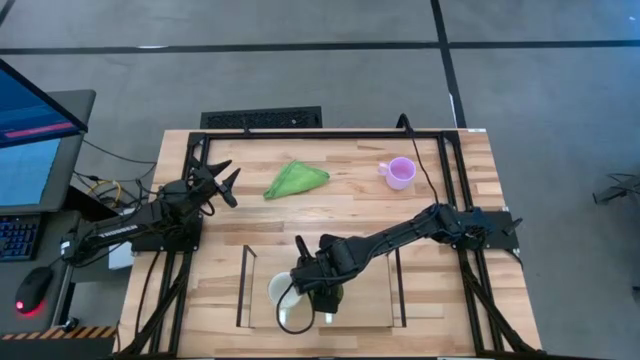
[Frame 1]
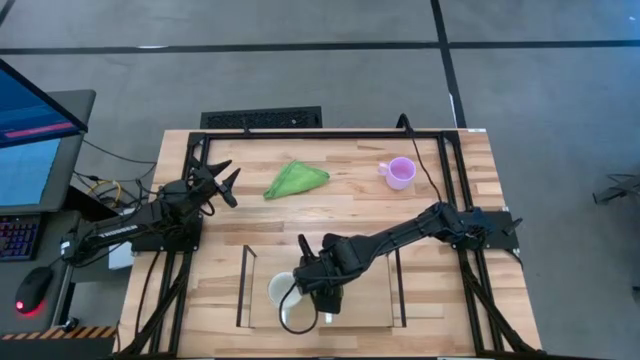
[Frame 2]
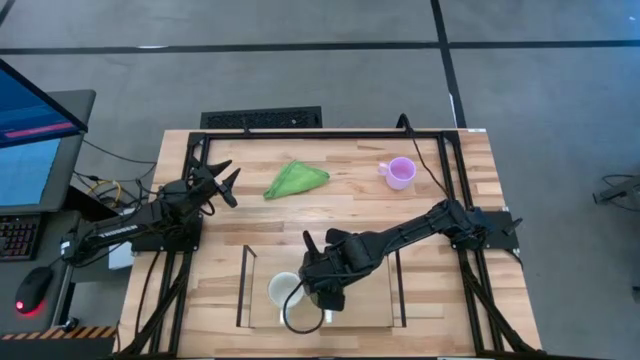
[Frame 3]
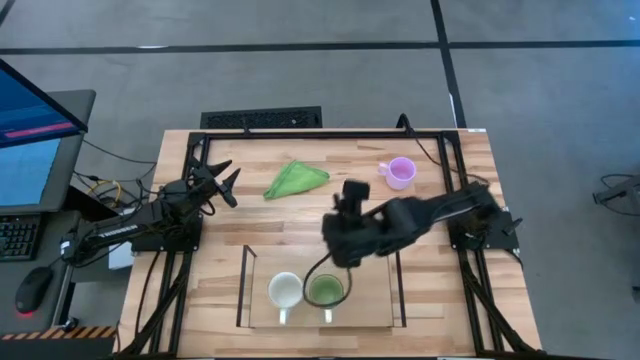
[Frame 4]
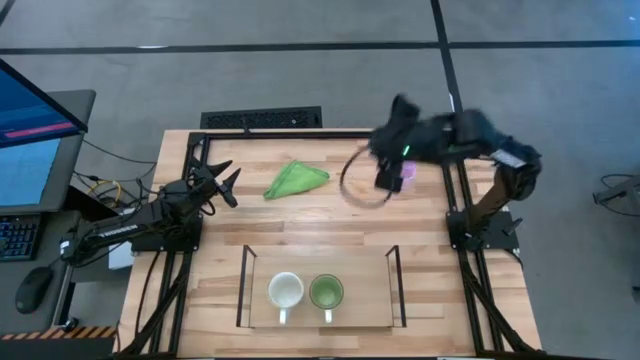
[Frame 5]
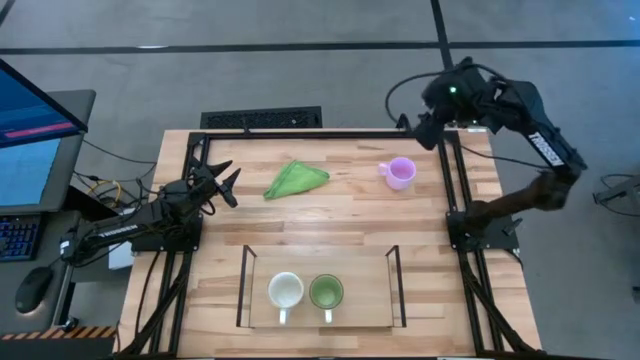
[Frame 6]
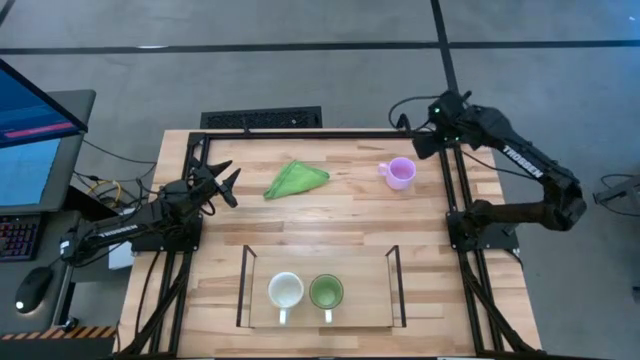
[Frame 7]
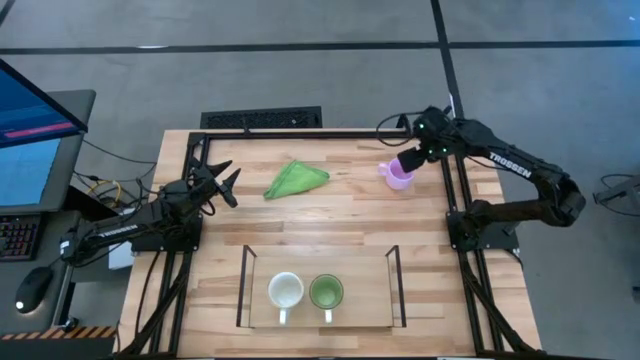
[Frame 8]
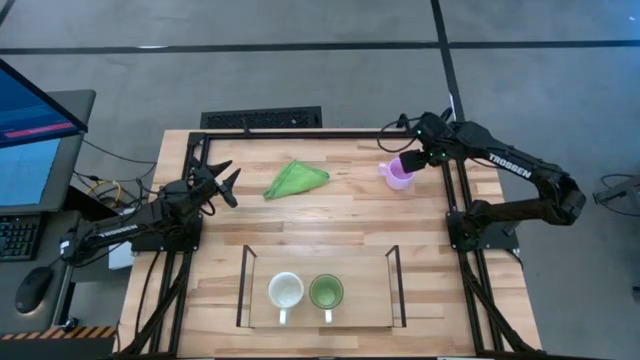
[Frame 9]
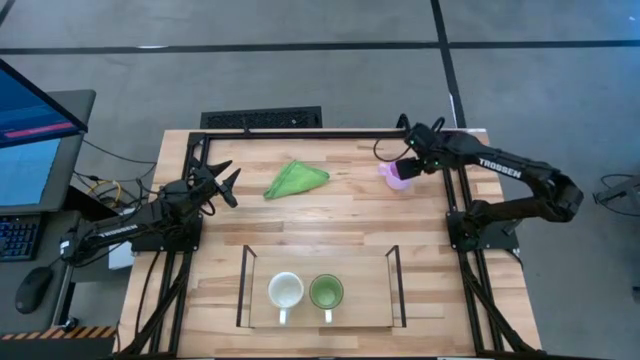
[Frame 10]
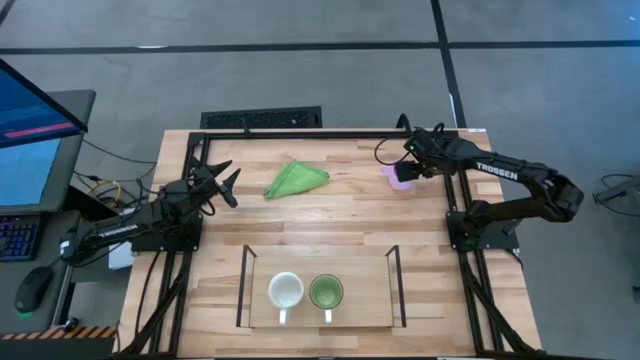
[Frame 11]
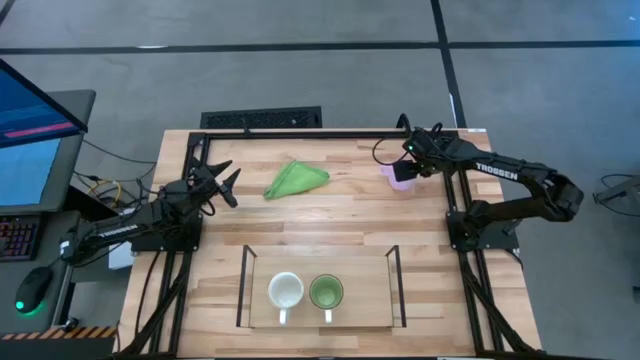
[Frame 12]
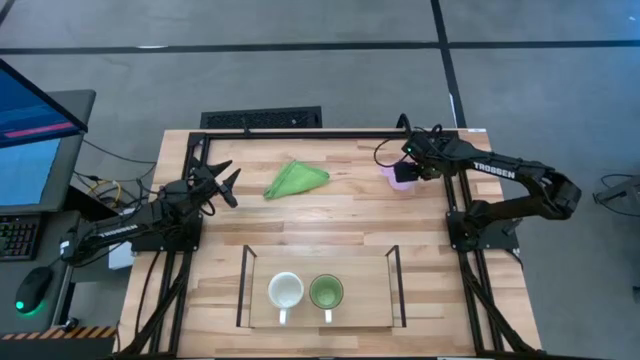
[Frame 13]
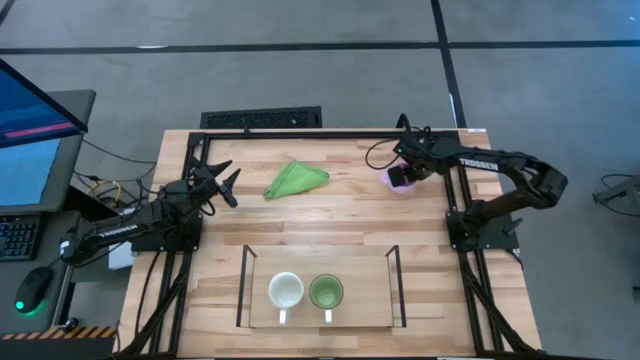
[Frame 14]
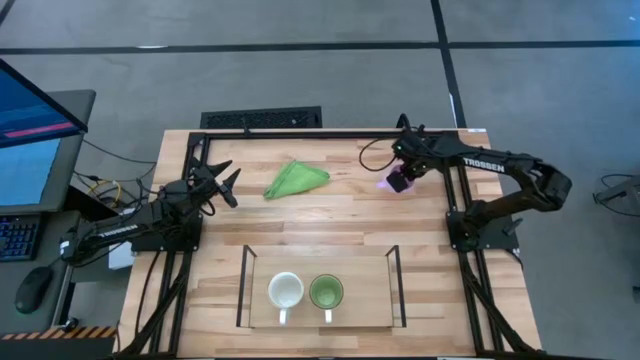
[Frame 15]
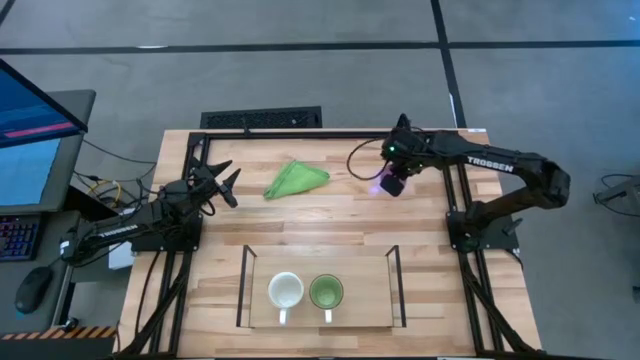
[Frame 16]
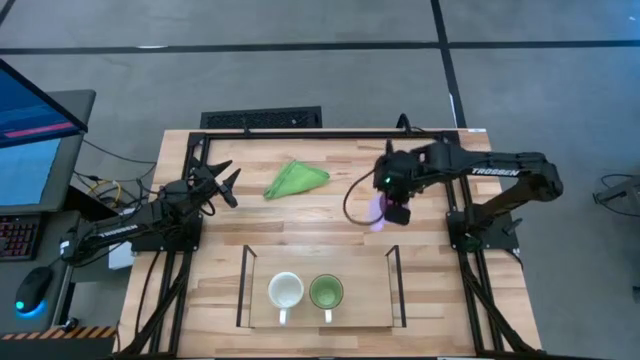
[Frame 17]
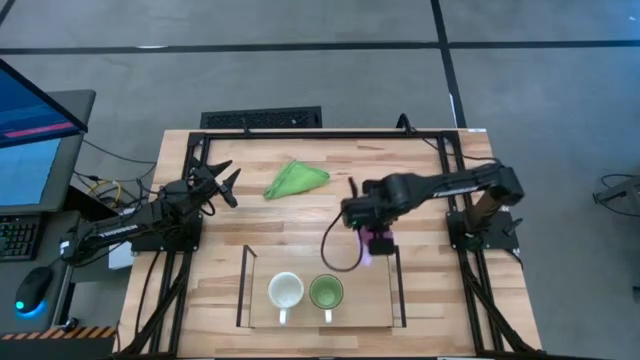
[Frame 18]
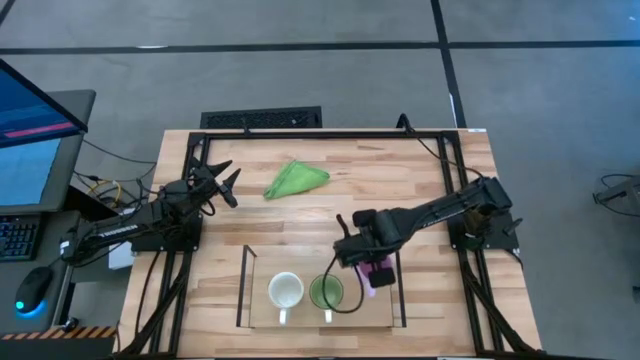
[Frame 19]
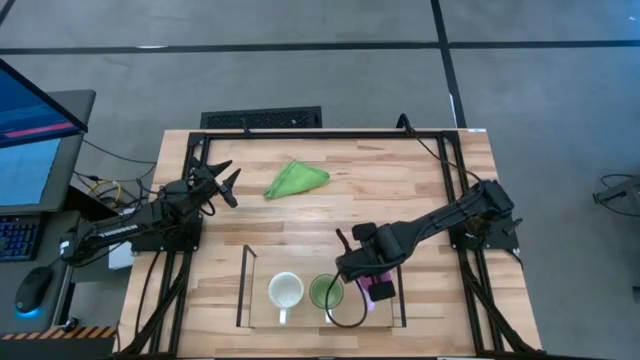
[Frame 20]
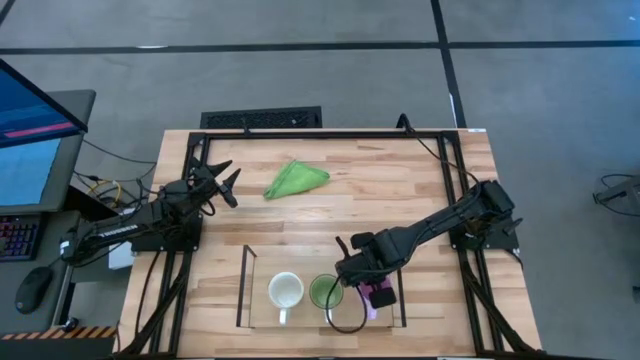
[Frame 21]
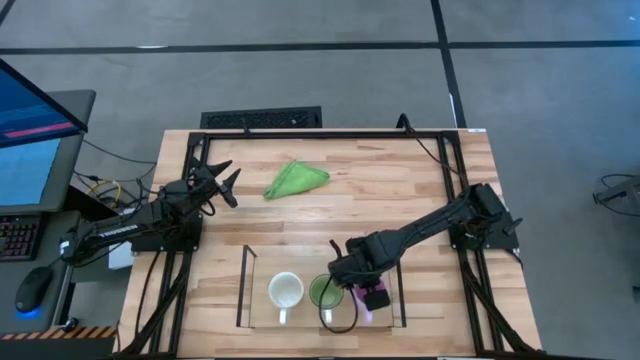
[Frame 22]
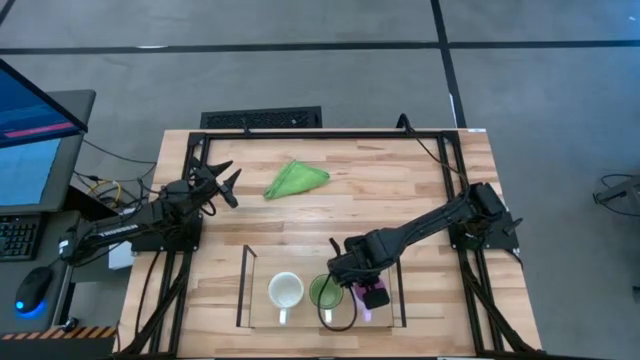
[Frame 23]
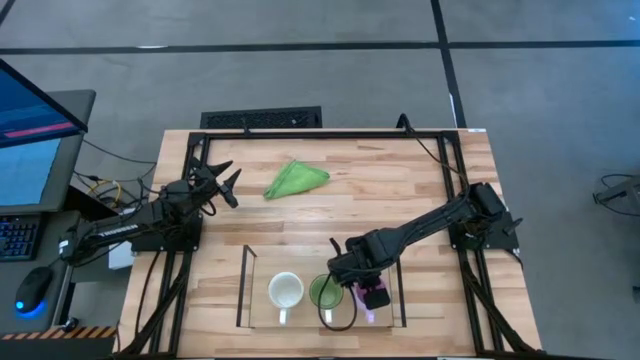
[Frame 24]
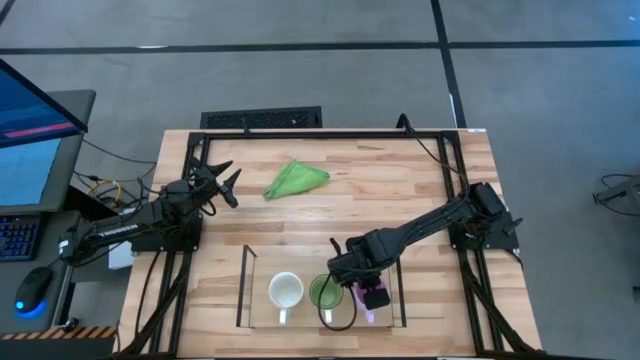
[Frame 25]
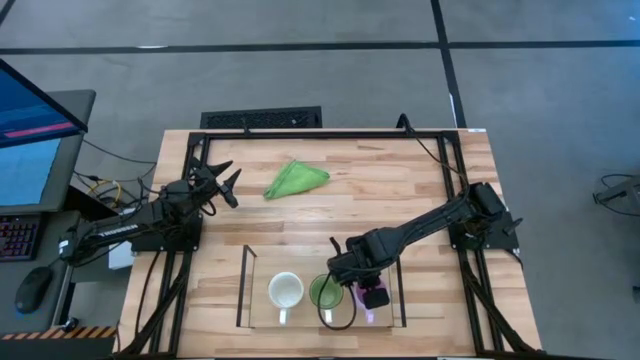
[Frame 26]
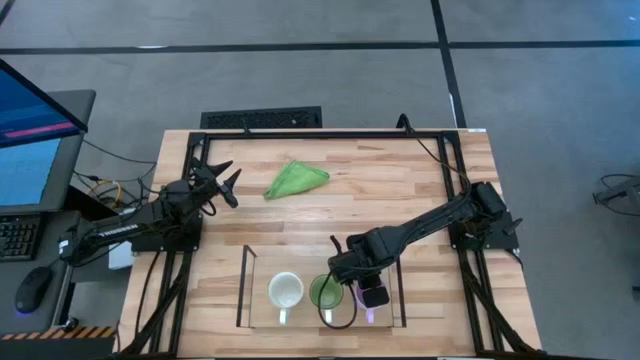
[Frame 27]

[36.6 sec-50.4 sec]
Task: Stack small to large cups/mugs on shelf
Put the pink mug on the shelf

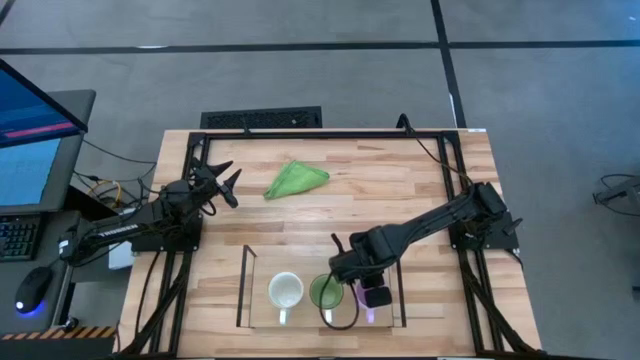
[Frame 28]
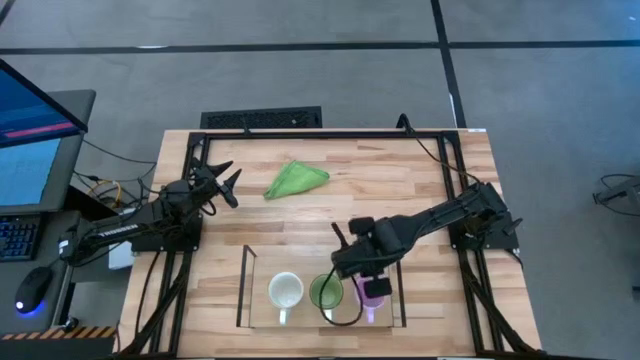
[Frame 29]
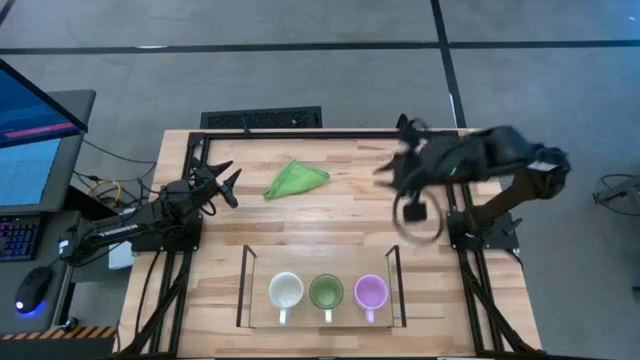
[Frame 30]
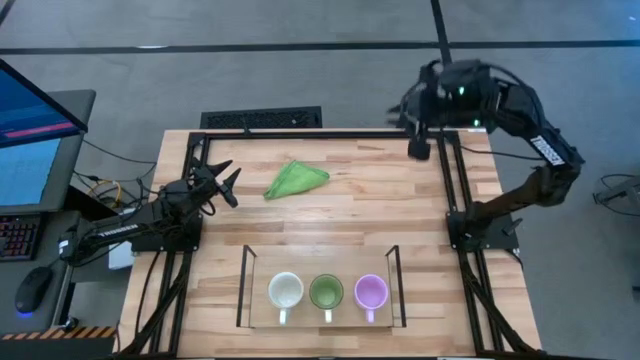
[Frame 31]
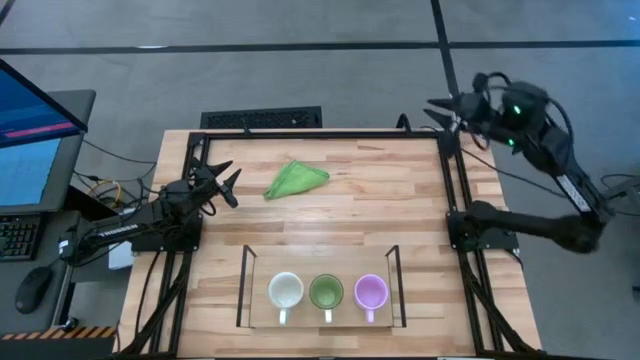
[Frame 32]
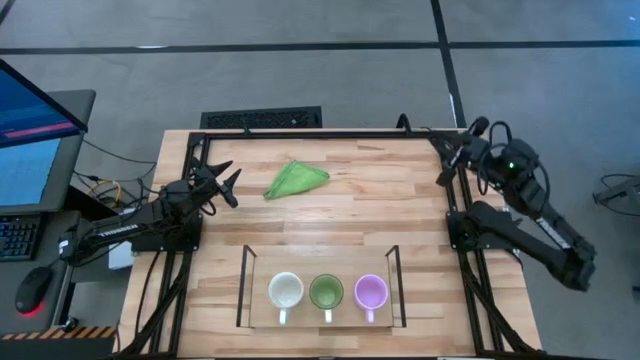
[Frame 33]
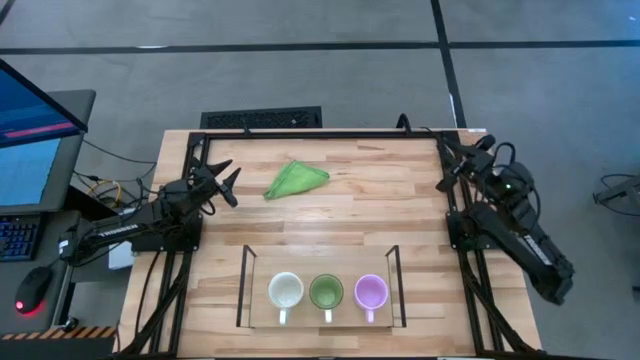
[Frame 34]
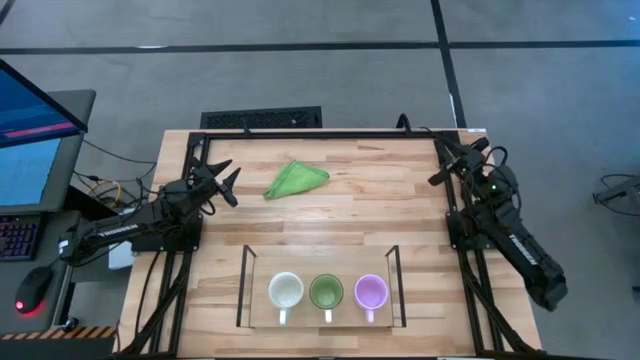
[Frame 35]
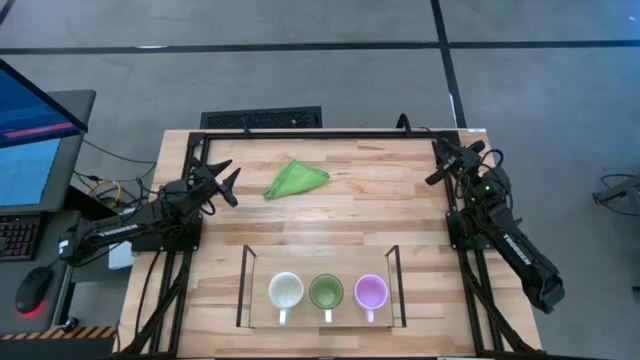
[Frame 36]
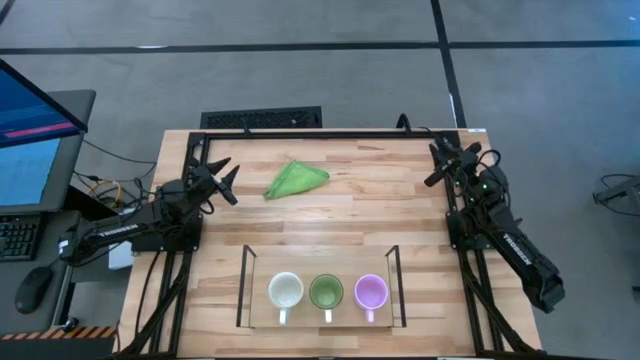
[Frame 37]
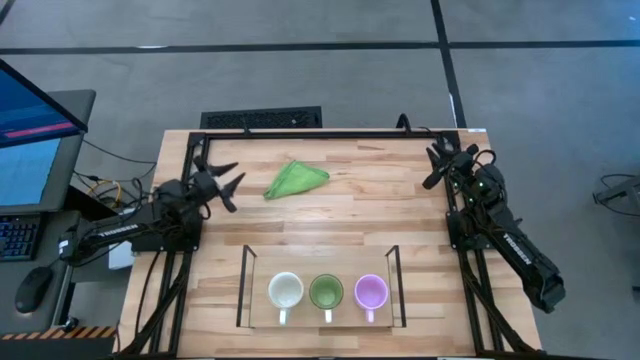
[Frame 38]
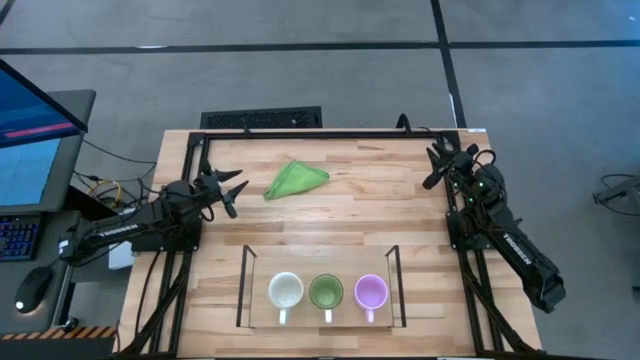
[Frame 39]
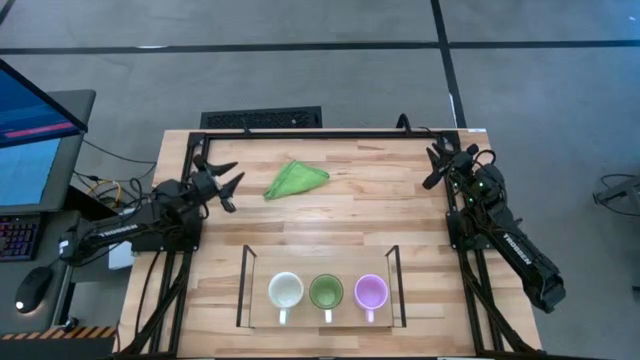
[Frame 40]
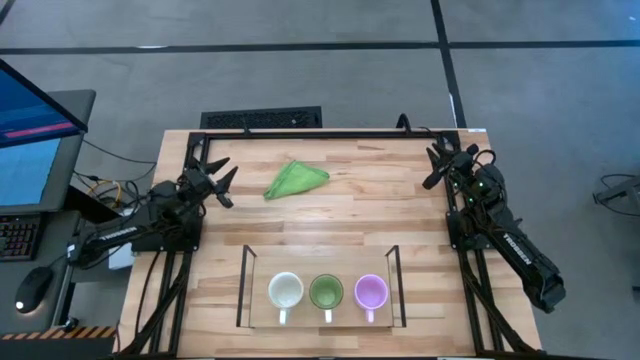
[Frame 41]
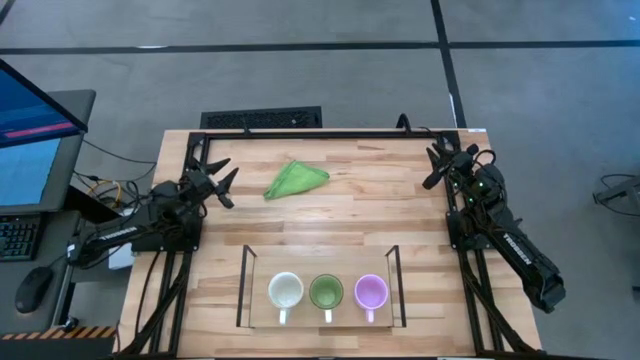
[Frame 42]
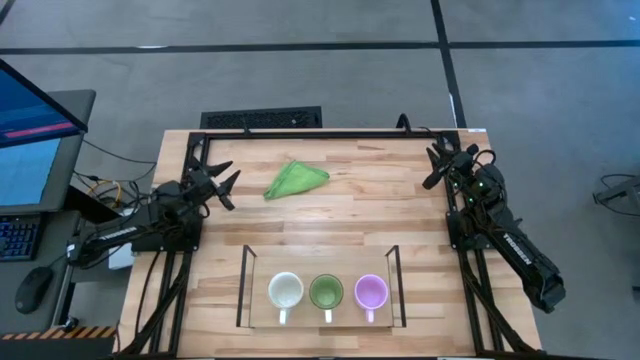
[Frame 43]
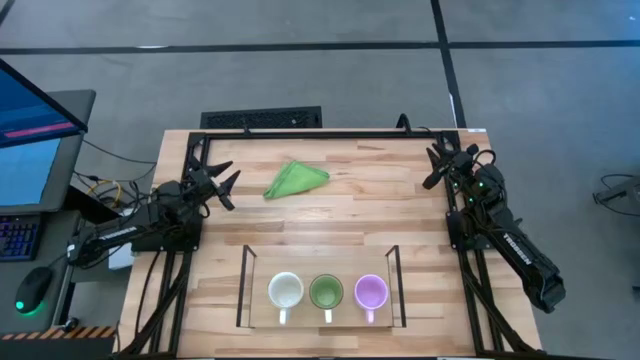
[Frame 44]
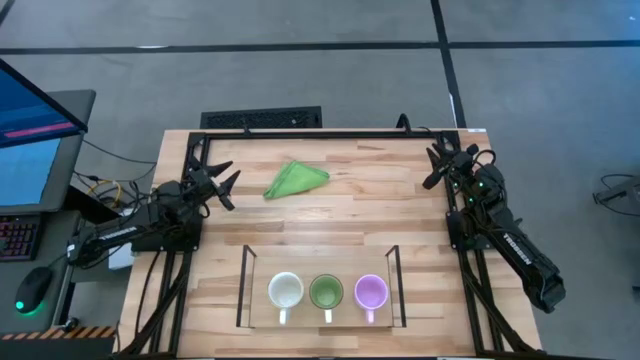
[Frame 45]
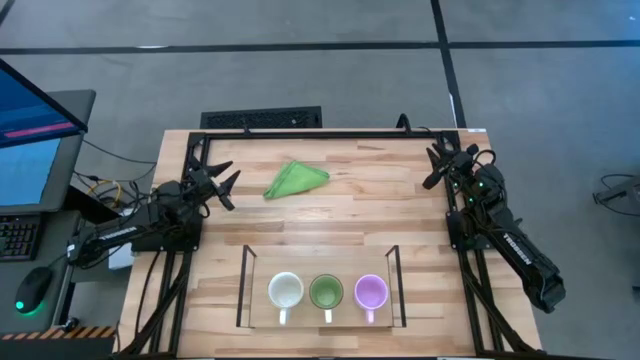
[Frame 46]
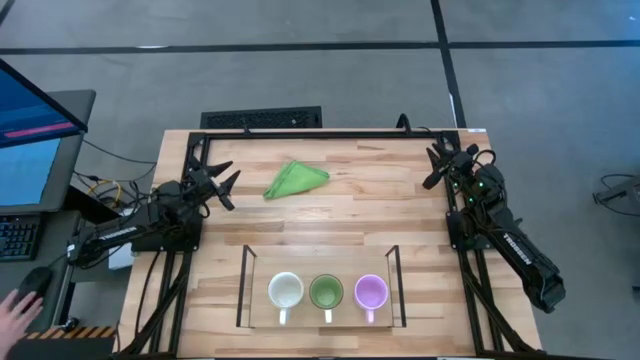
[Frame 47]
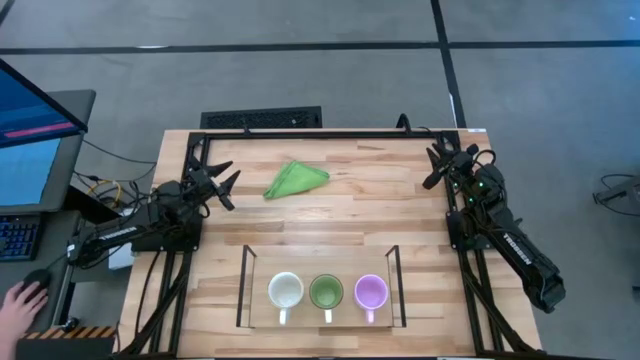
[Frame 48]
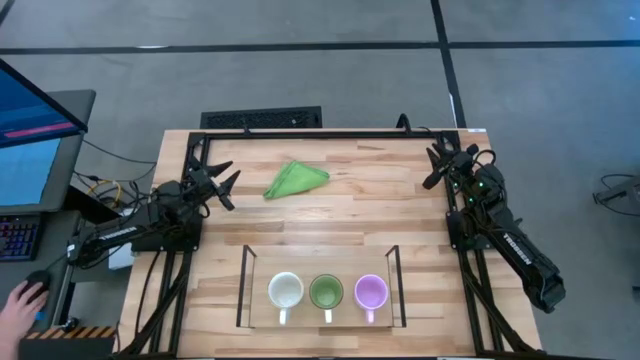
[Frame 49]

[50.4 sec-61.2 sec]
Return to Home Position
